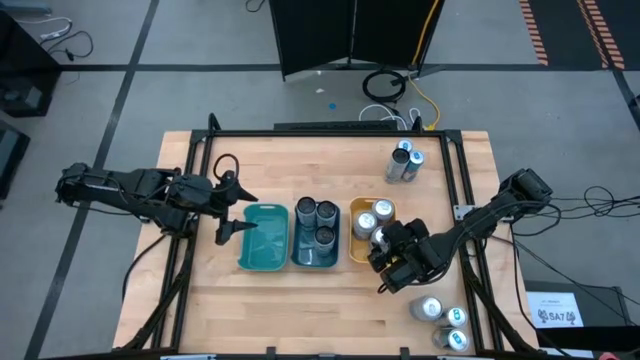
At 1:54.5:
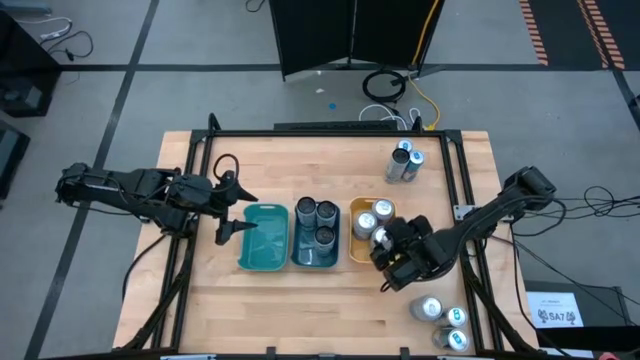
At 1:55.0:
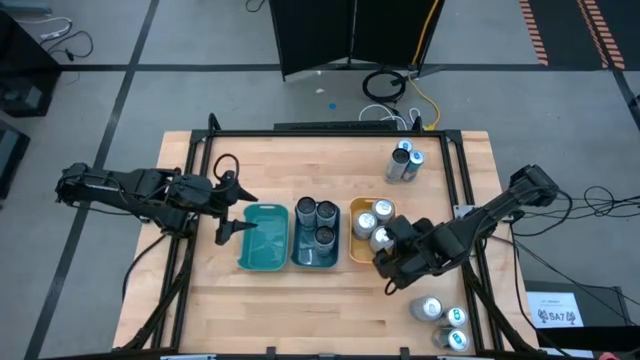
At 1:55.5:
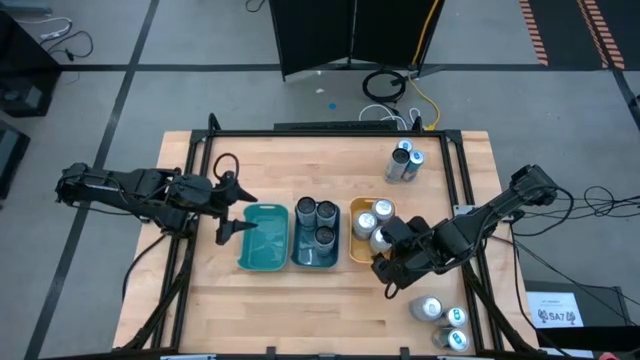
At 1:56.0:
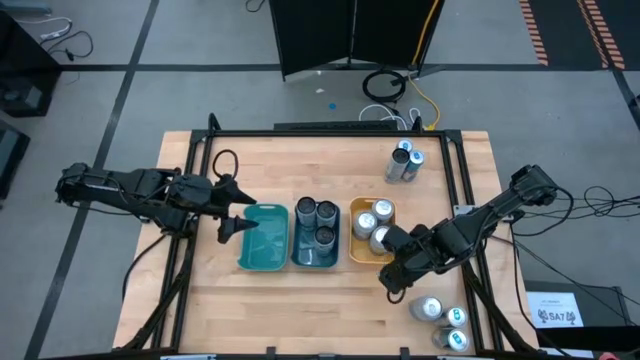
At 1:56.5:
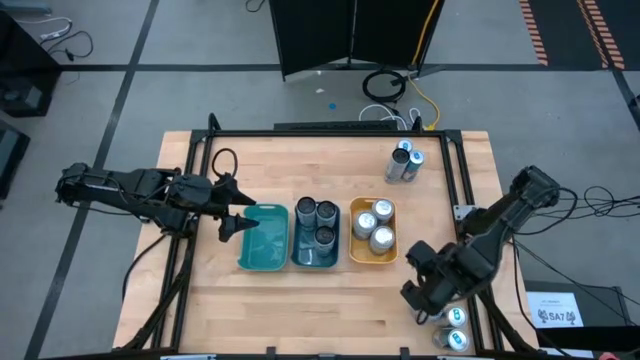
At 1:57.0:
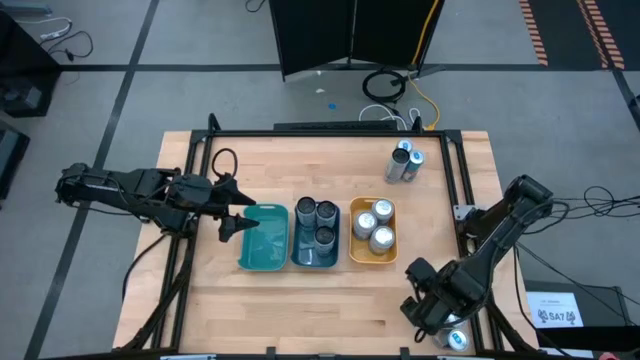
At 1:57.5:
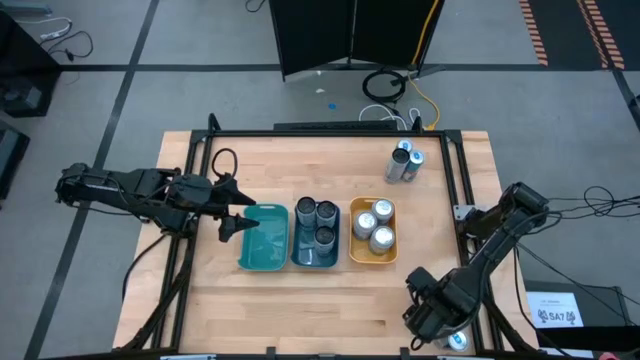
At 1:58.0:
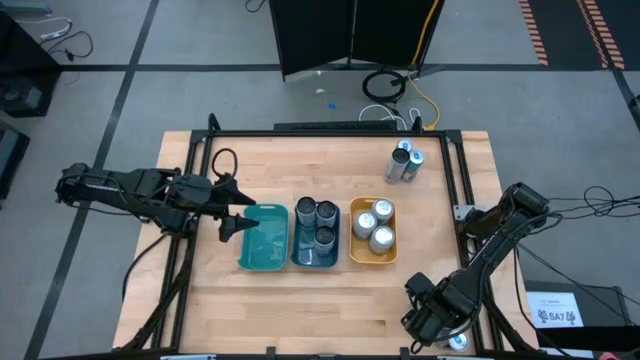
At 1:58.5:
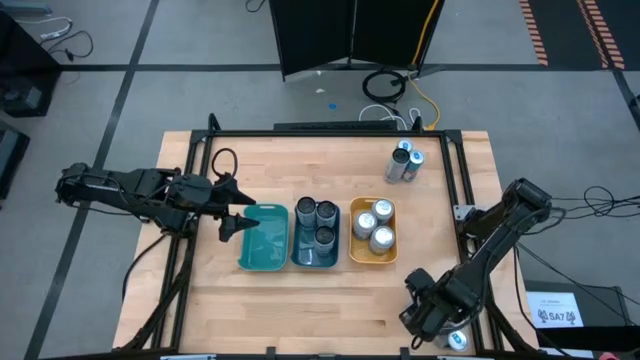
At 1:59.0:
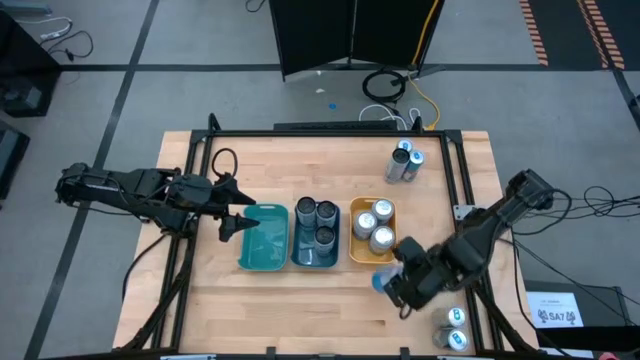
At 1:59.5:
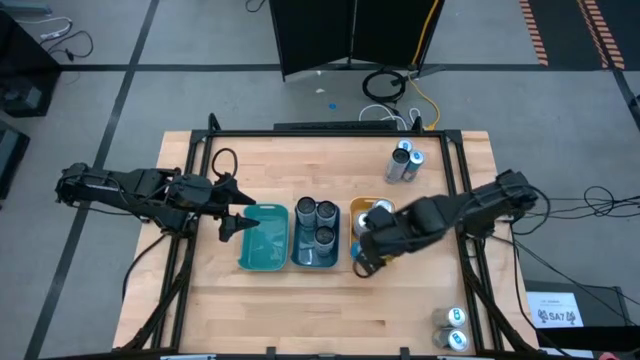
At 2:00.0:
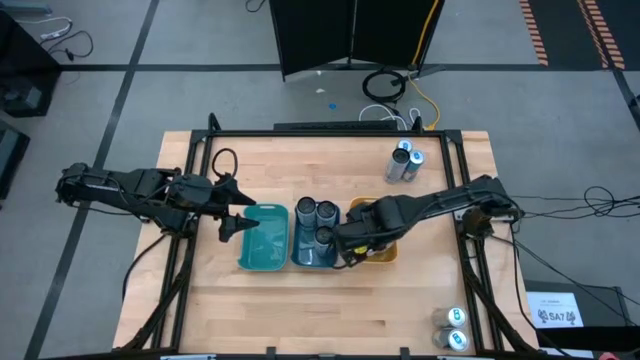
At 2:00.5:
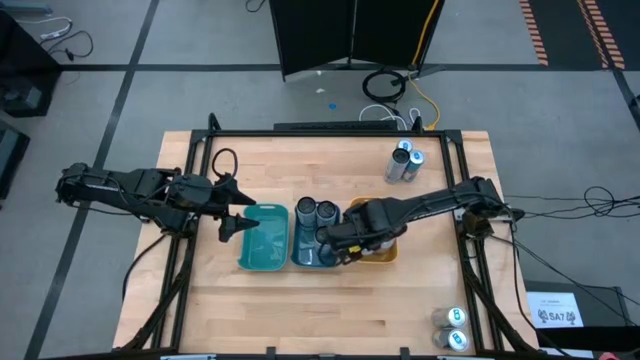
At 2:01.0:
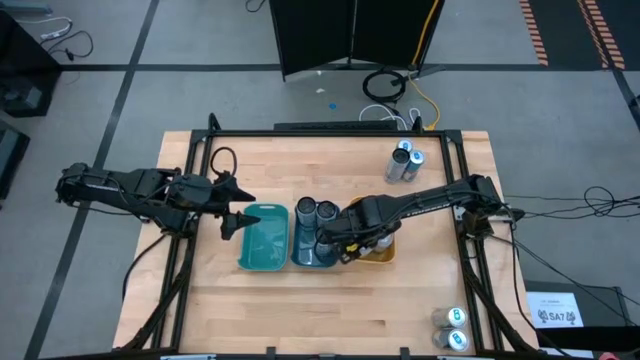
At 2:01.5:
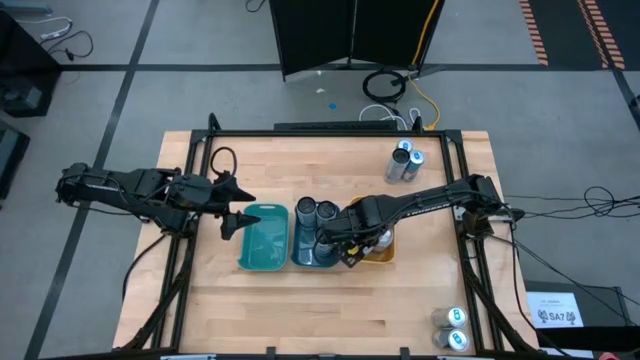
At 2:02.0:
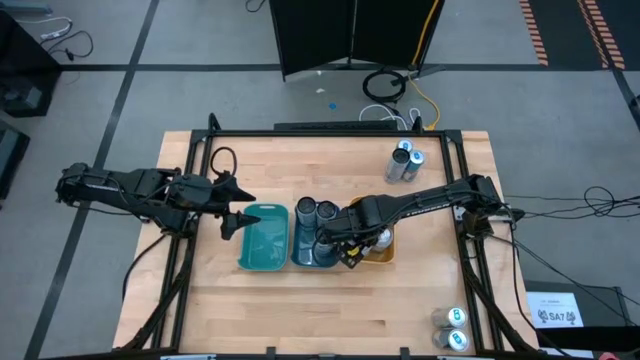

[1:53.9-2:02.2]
Task: Sort soda cans
Put the silver soda can into the yellow bin

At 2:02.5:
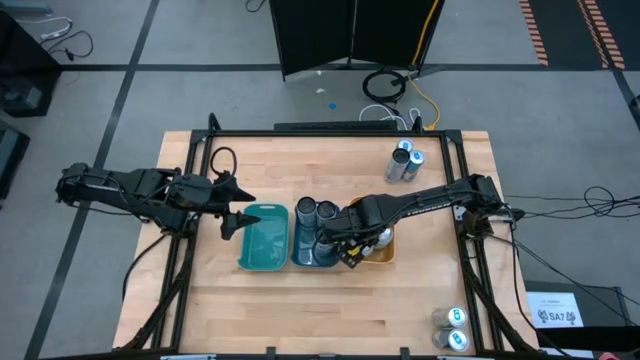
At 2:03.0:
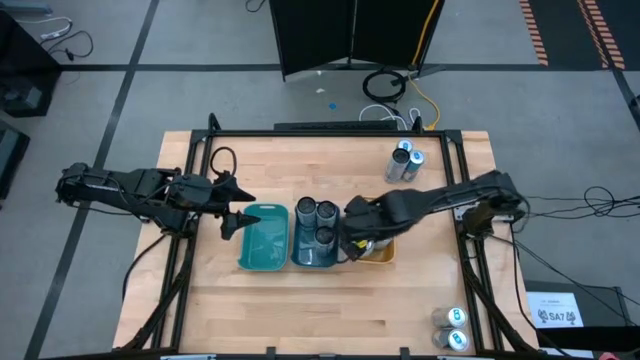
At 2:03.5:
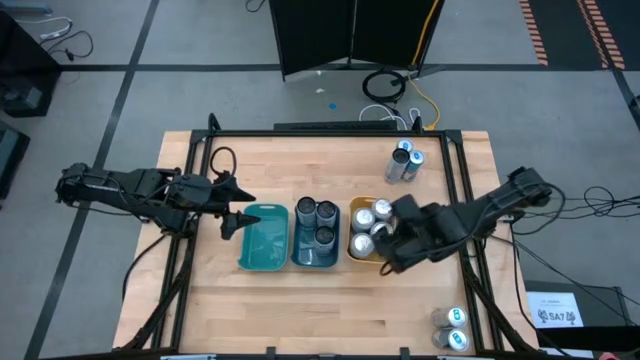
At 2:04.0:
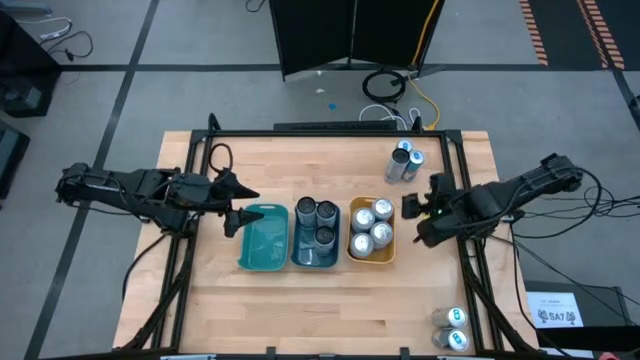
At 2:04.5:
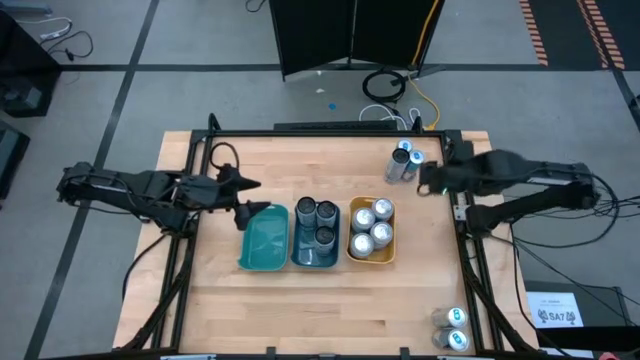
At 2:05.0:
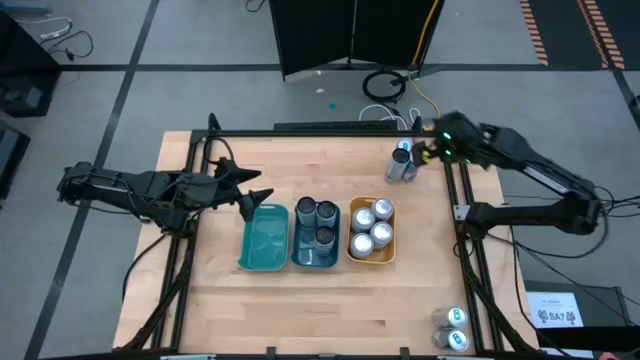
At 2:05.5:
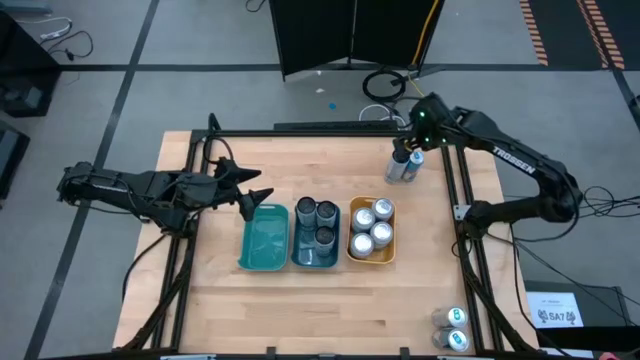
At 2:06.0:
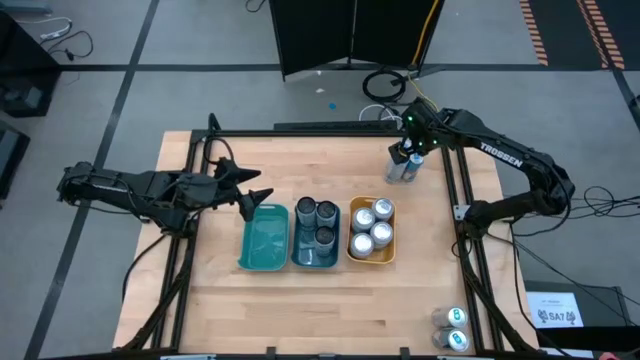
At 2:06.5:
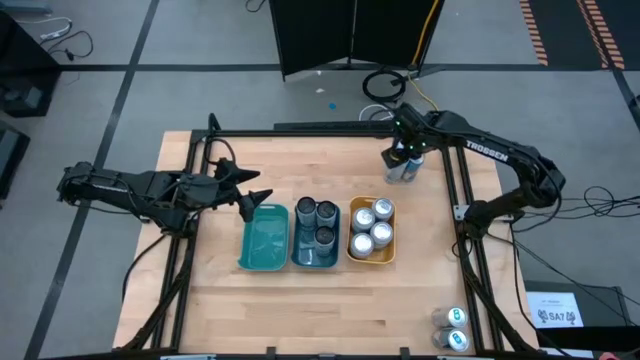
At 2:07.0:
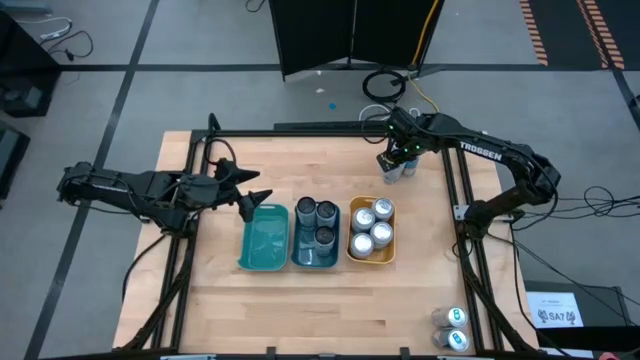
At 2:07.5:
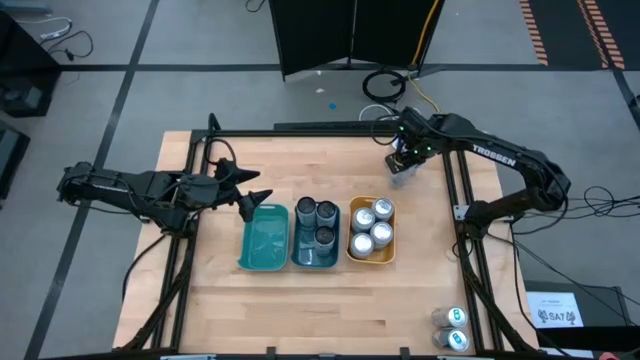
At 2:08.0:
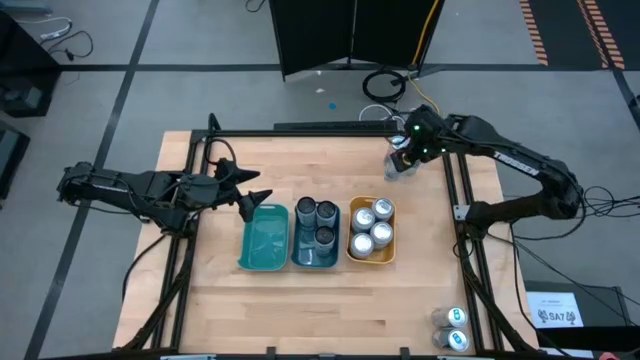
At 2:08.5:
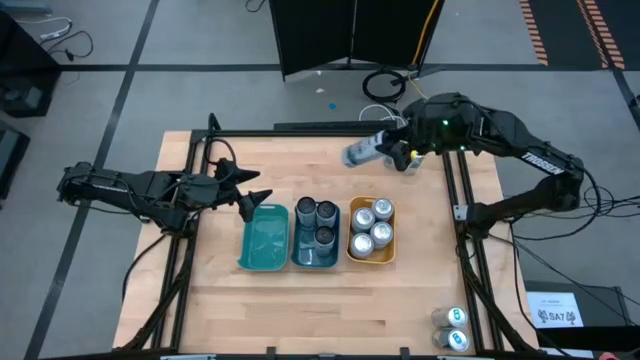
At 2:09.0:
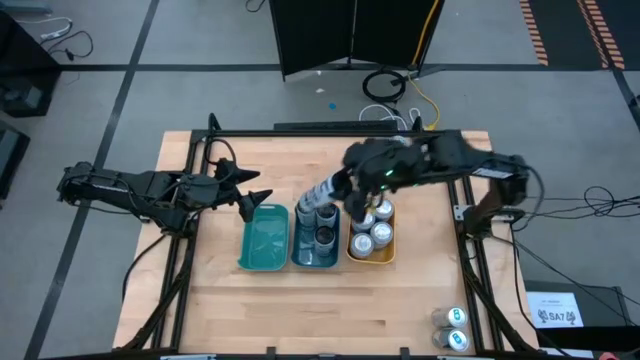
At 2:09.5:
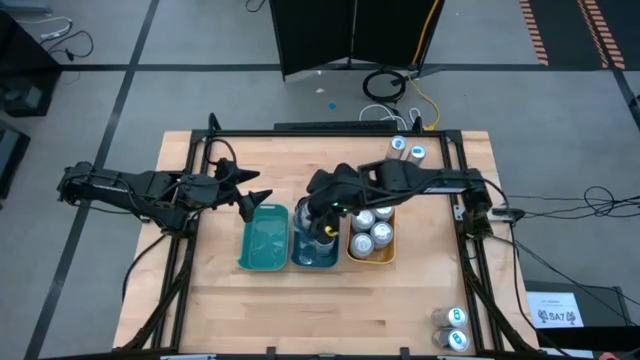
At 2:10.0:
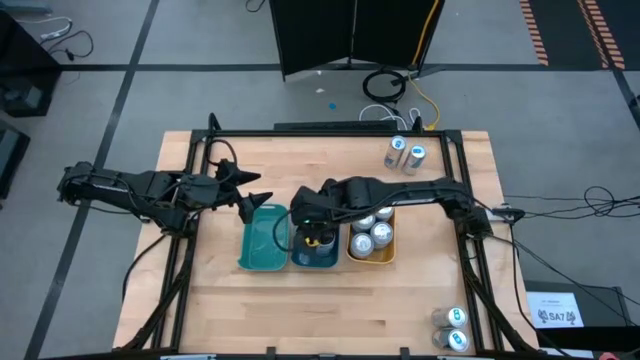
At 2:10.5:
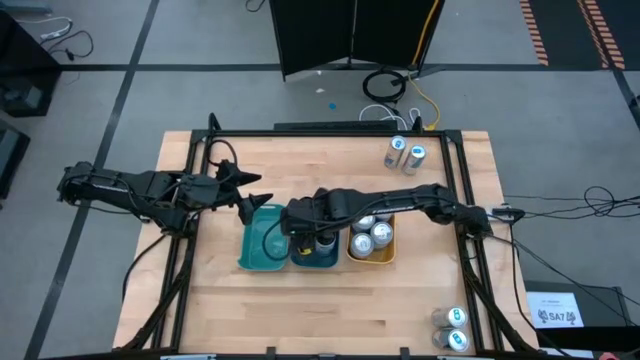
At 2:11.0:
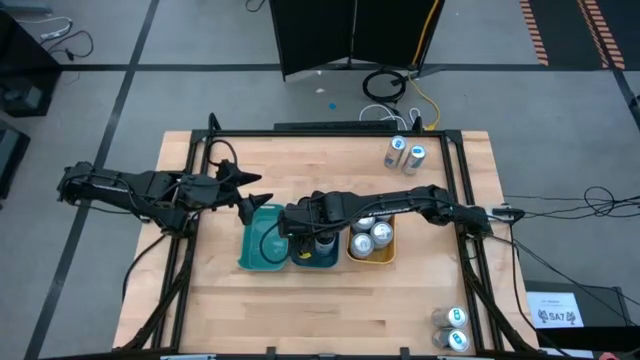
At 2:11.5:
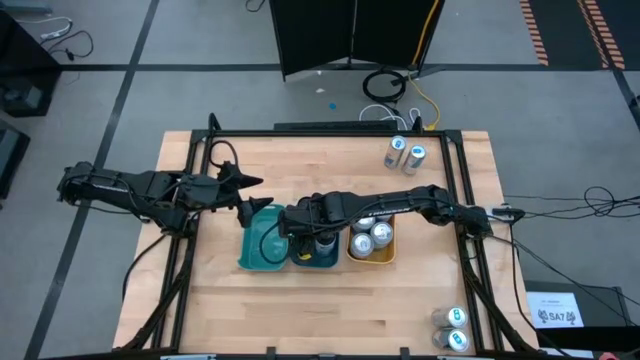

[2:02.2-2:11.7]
Put the black soda can into the blue bin

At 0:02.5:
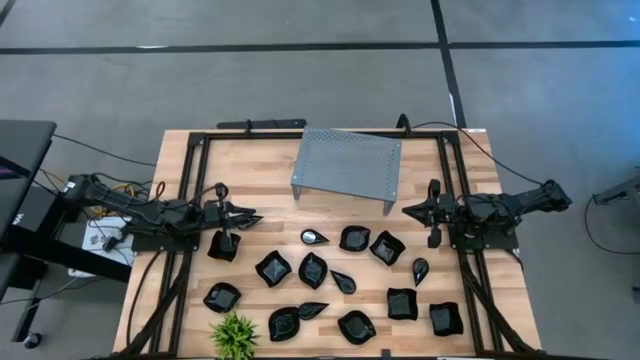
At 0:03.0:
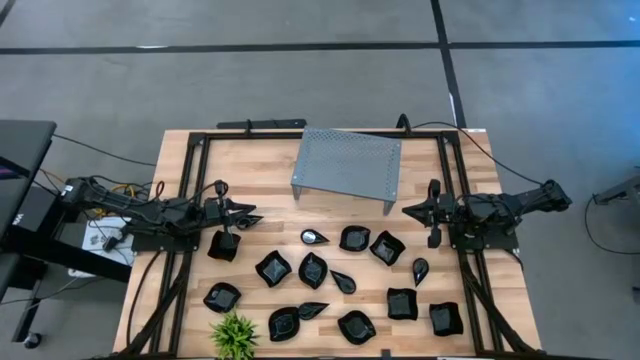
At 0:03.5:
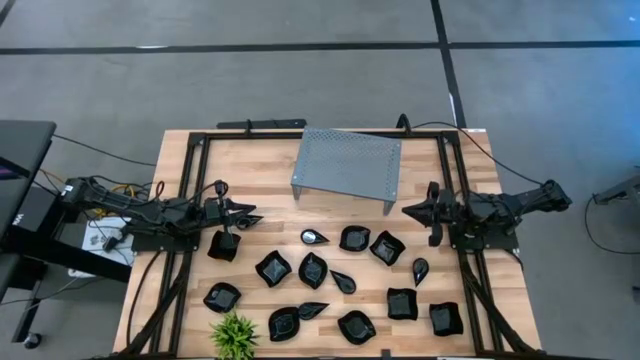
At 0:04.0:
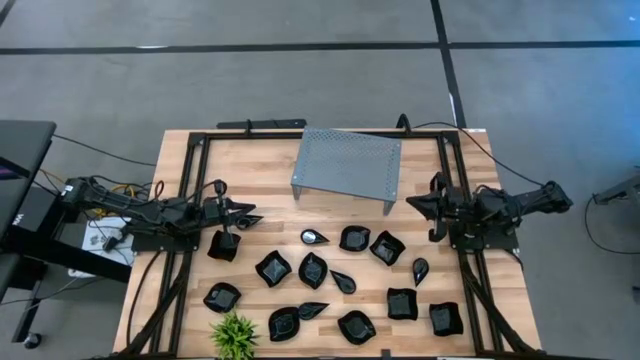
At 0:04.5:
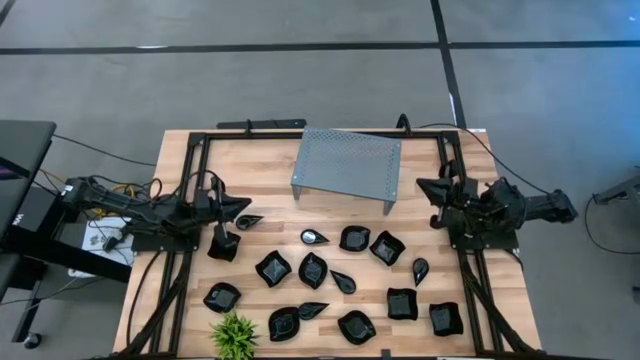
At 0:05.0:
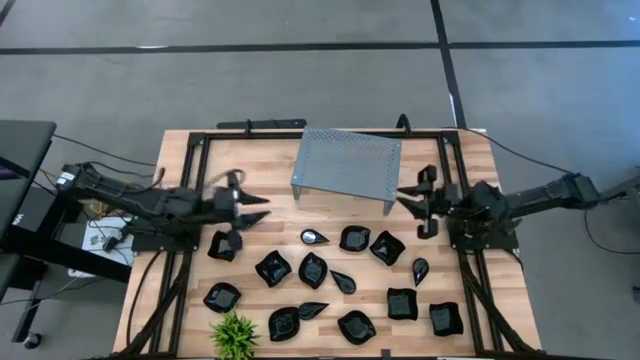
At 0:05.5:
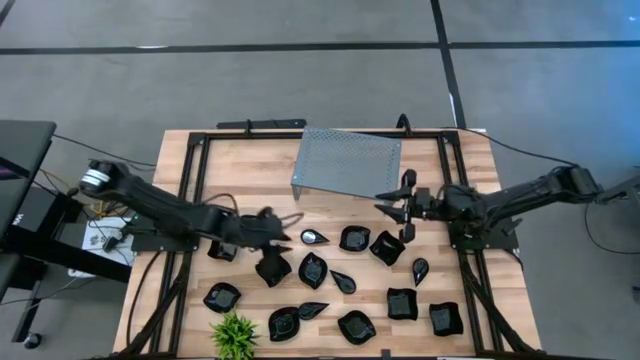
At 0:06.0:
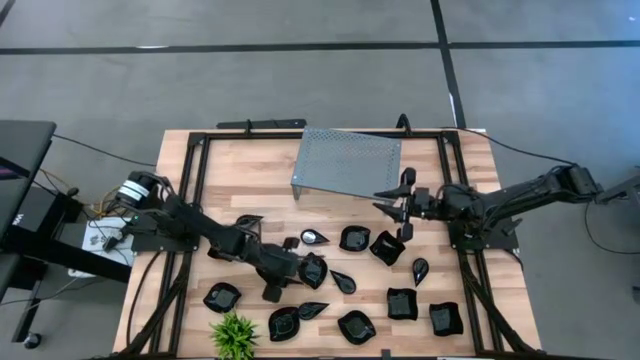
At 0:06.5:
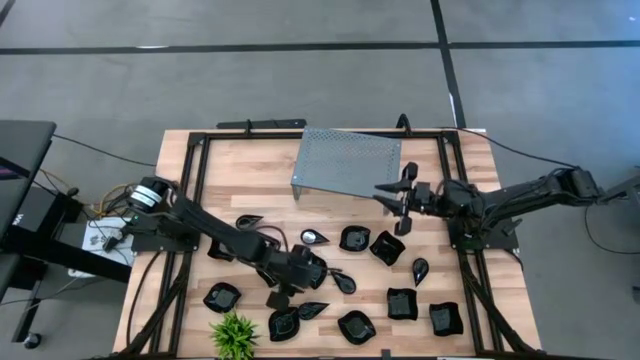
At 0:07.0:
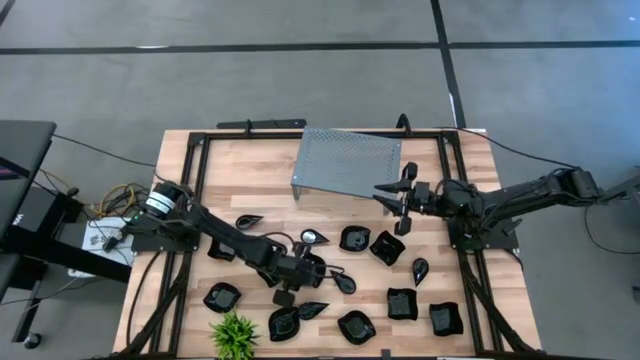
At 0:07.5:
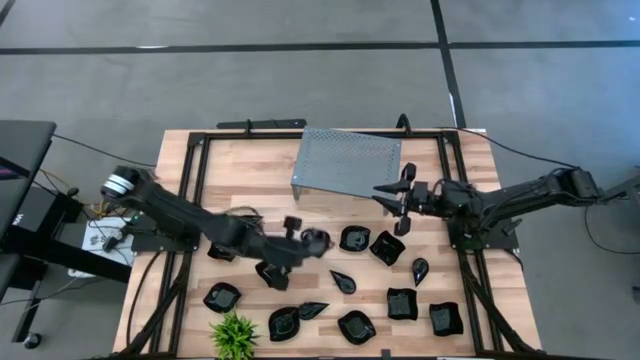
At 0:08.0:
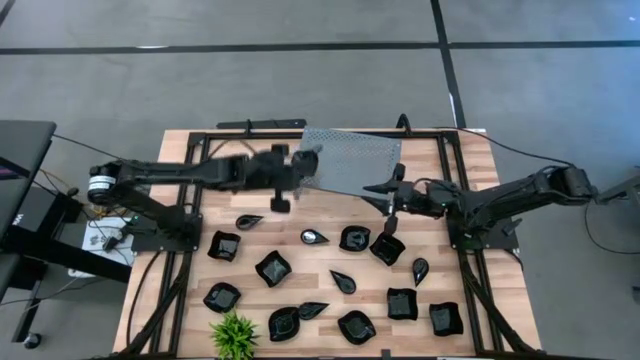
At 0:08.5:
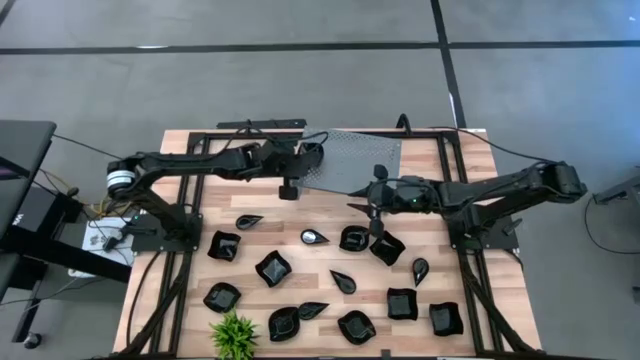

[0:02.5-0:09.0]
Task: Pick & Place Mini shaped plates
Put the black leaf-shaped plate on the shelf
